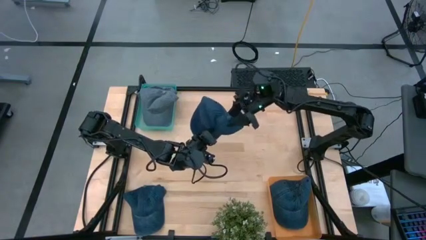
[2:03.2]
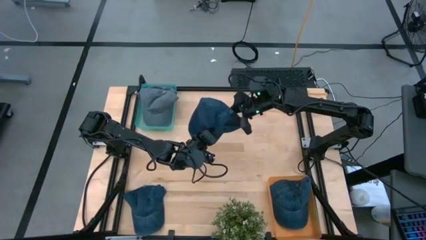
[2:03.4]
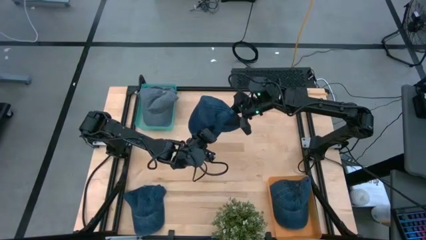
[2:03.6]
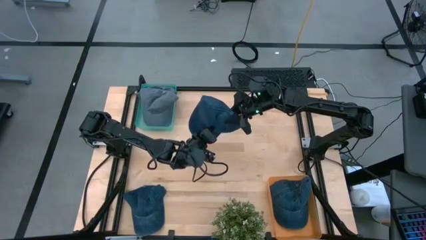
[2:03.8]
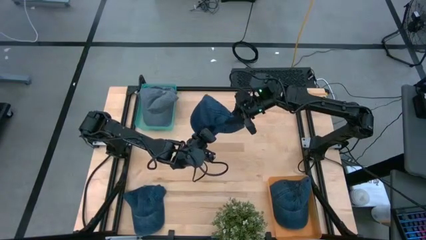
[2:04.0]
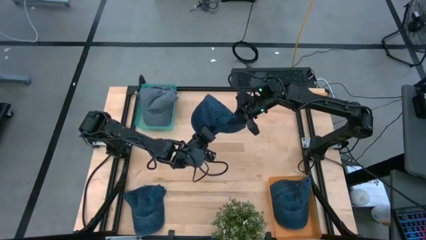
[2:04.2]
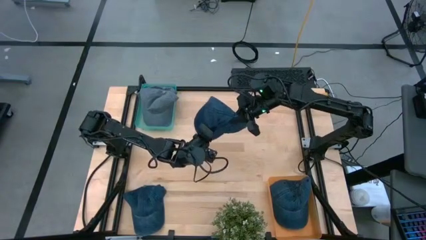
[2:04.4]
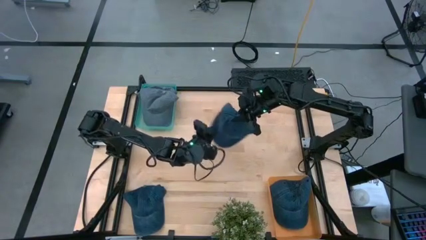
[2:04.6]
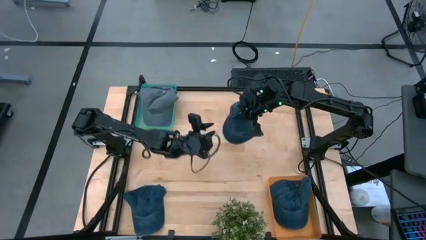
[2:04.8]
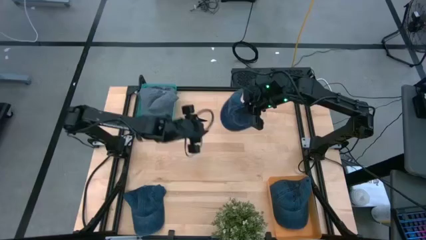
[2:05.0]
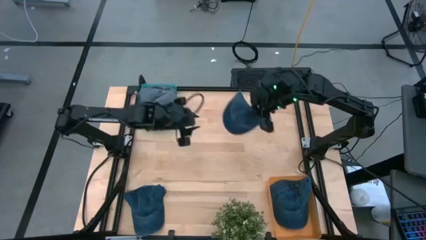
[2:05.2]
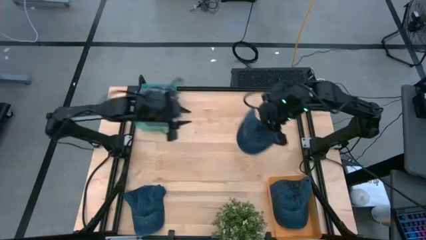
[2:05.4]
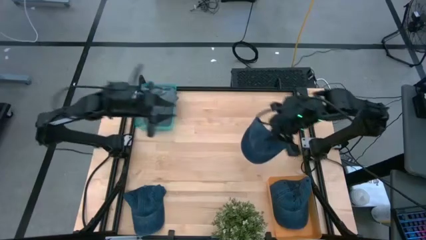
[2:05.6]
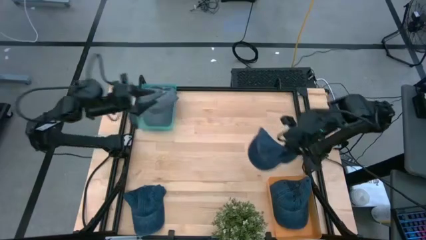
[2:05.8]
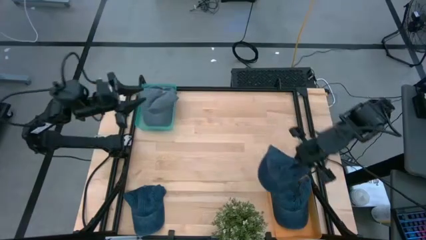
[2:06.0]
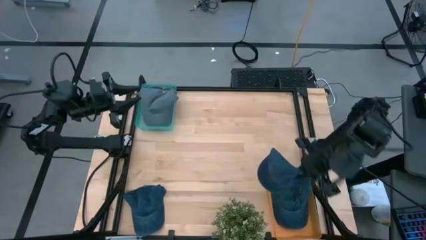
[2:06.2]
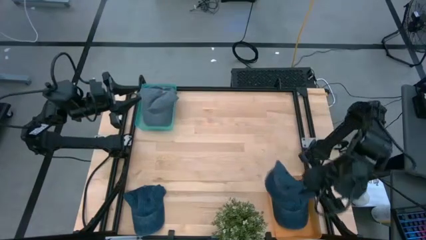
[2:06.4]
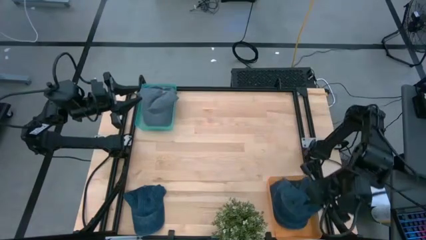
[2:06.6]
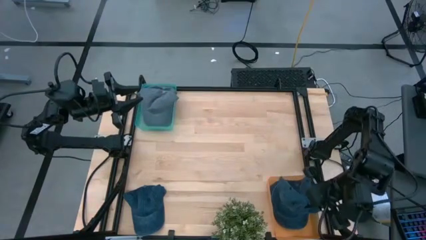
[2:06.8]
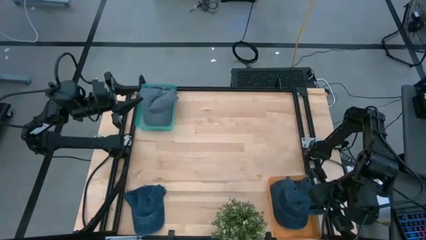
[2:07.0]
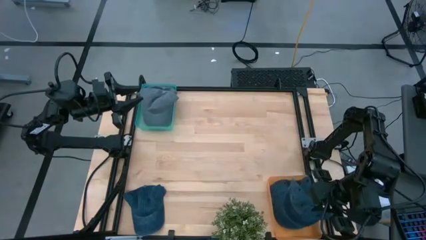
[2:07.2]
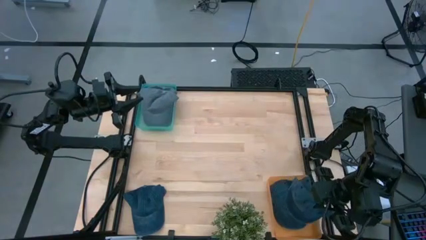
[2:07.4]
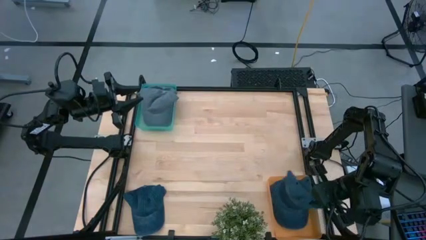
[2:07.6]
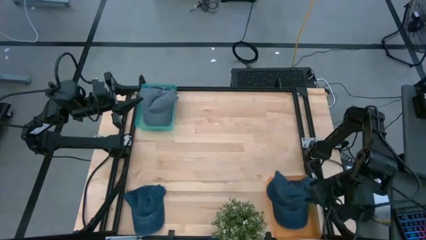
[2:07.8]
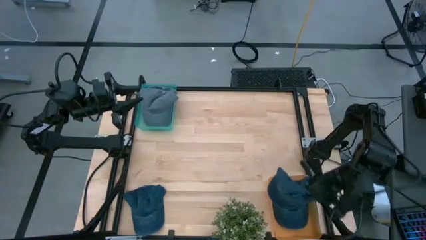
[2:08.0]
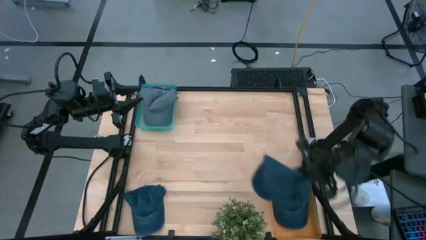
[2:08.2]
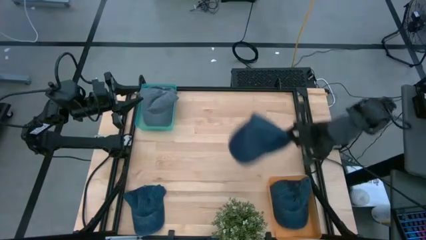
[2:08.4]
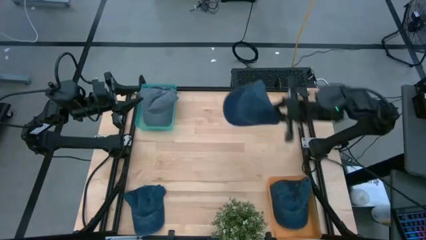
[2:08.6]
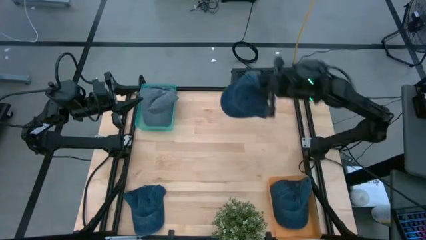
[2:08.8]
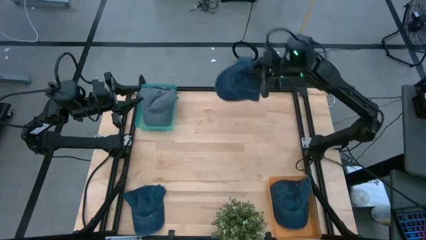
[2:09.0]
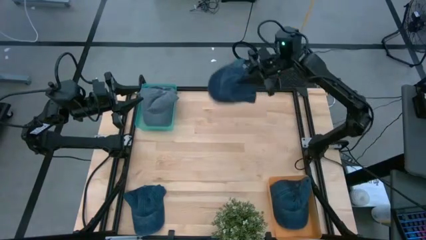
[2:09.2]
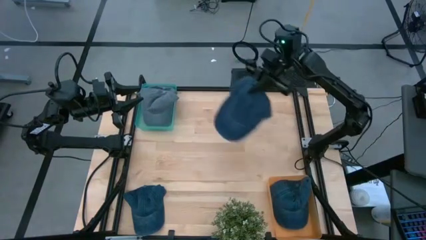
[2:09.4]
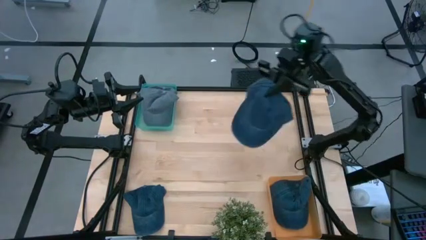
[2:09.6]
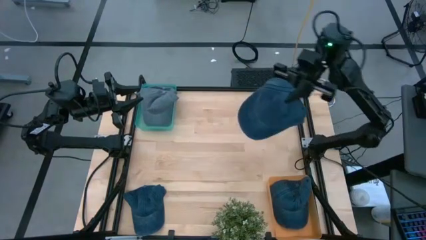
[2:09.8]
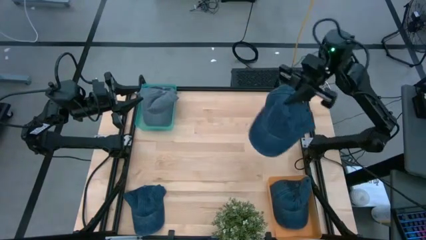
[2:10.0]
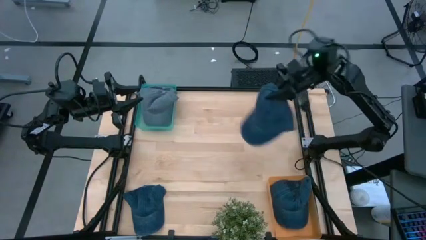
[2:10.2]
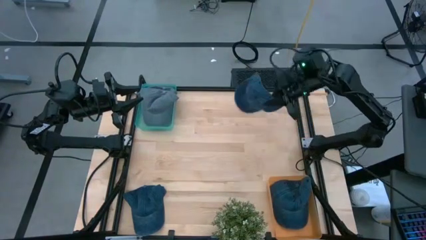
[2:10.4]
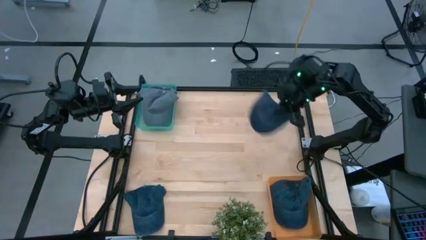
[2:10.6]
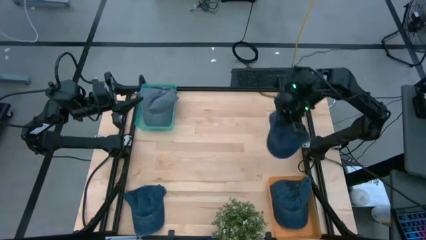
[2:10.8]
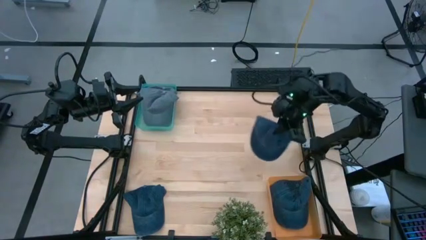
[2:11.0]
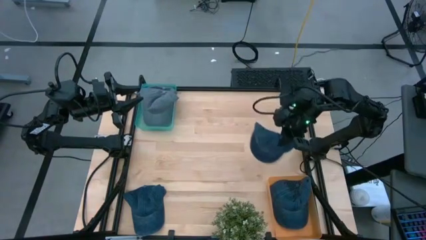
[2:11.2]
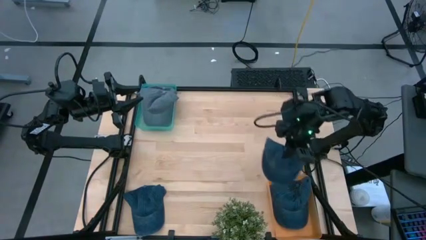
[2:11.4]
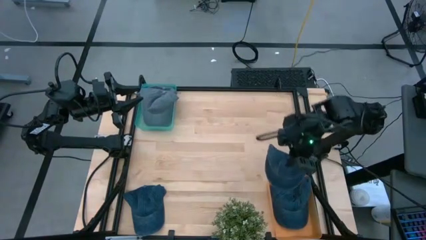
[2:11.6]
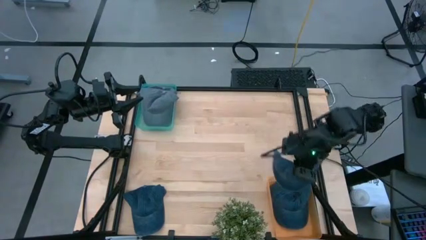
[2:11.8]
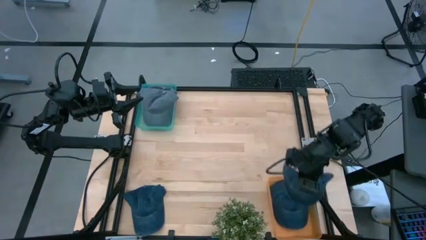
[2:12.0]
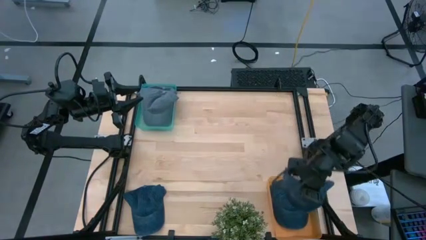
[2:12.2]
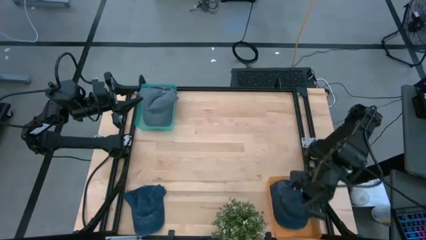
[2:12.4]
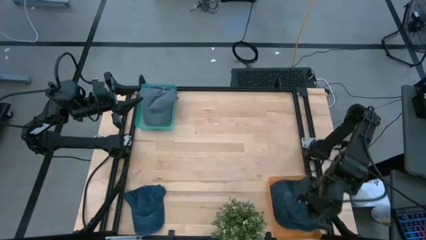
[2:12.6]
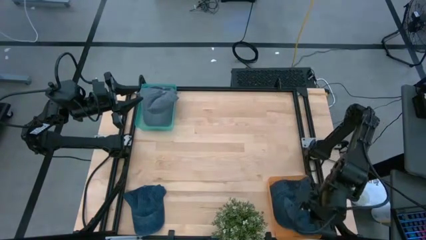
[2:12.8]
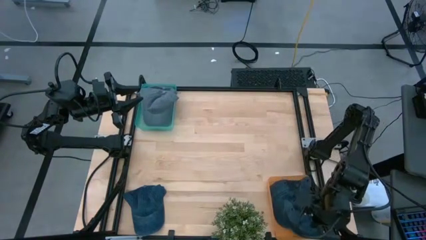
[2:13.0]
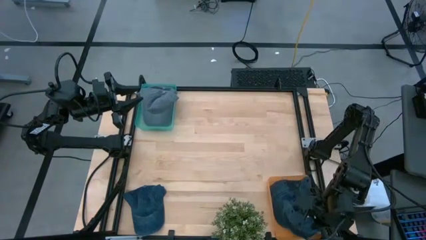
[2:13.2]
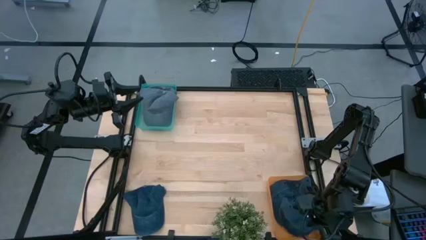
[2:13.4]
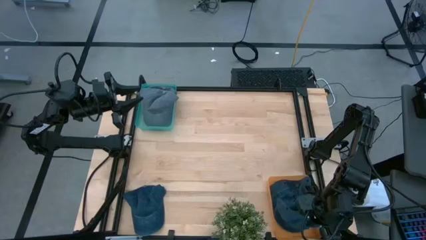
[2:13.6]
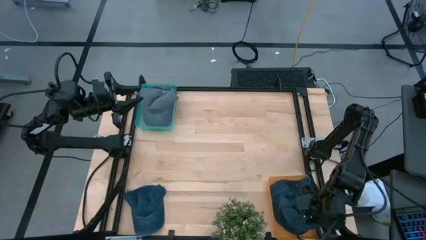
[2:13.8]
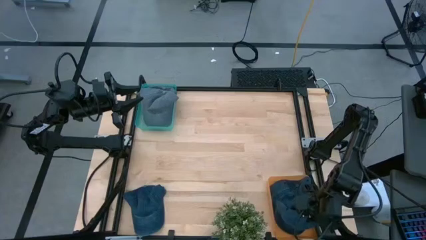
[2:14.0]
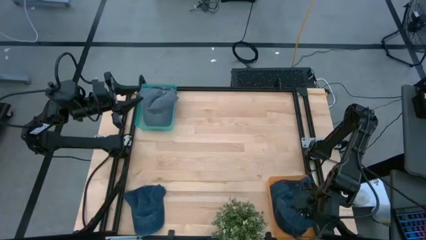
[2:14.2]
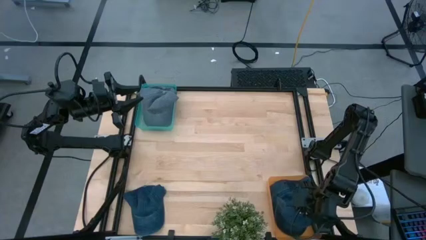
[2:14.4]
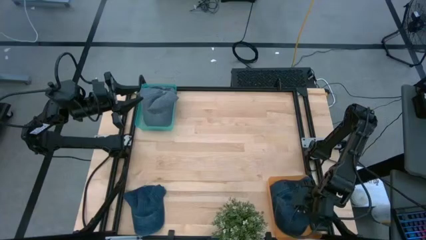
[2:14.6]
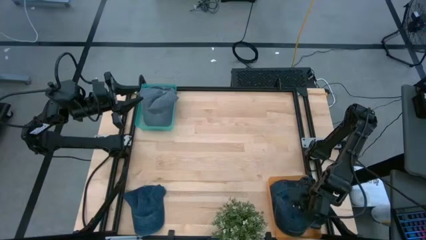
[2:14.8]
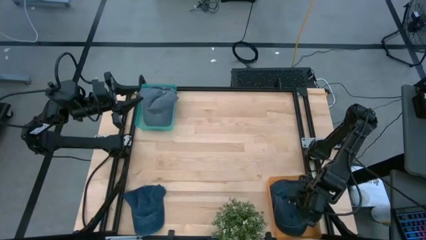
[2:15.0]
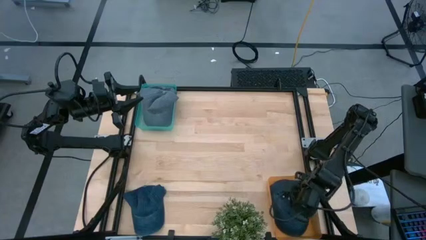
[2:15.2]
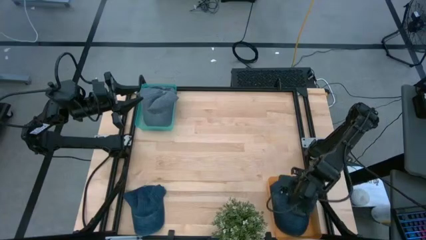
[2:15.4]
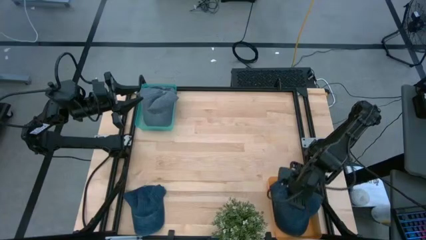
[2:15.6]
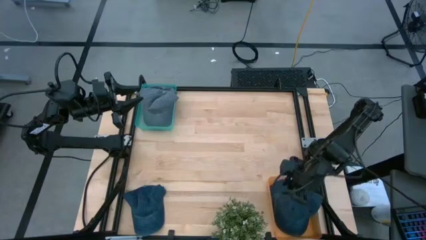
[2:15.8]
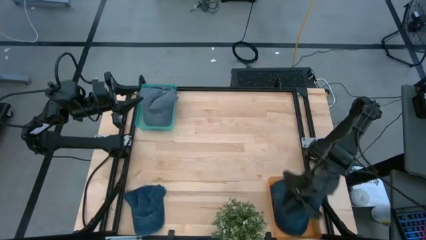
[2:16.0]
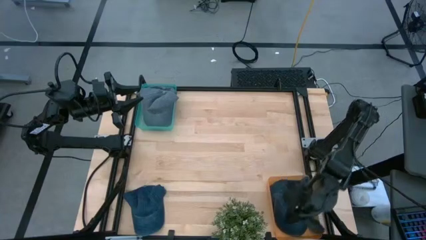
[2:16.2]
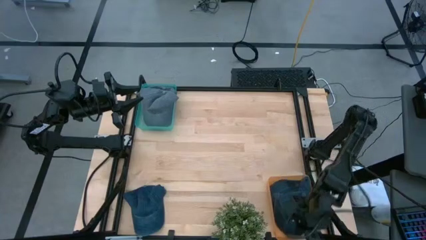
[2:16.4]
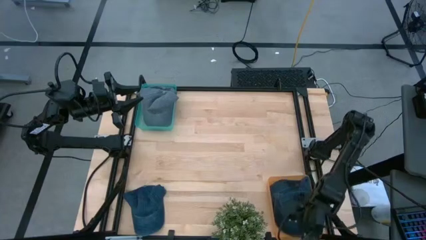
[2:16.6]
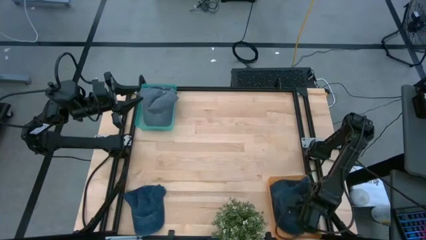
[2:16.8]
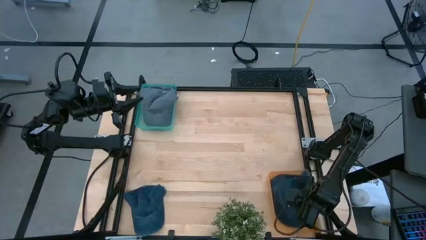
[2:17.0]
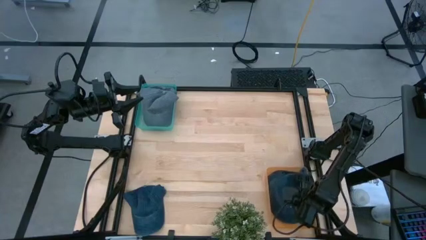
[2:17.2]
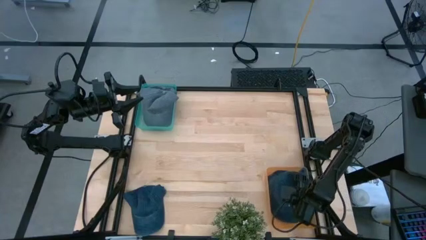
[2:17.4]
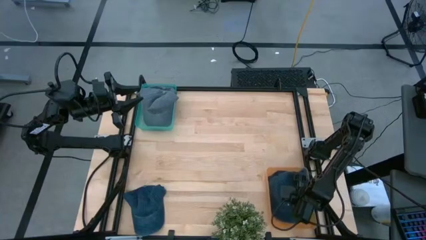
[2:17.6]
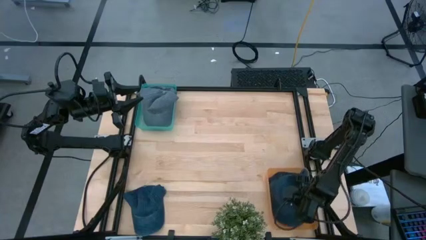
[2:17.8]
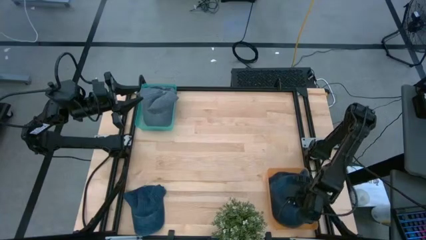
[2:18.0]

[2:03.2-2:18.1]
Task: Pick & Place hat
Put the top blue cap into the orange bin

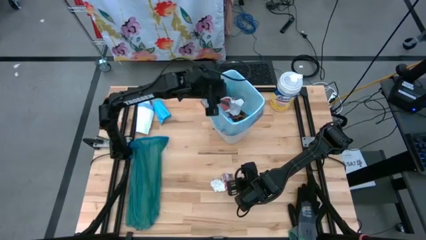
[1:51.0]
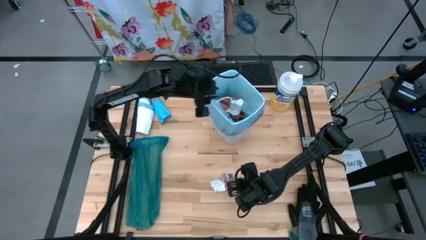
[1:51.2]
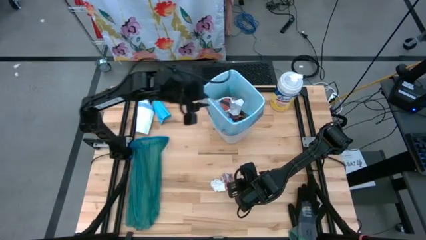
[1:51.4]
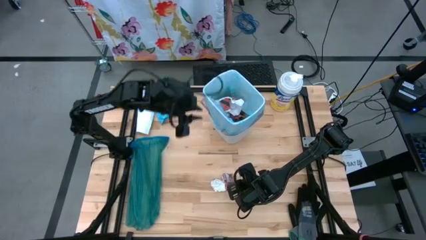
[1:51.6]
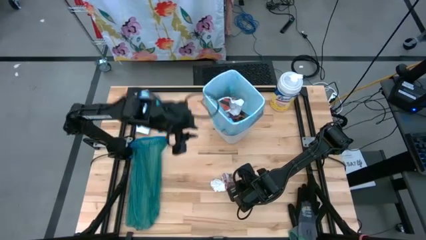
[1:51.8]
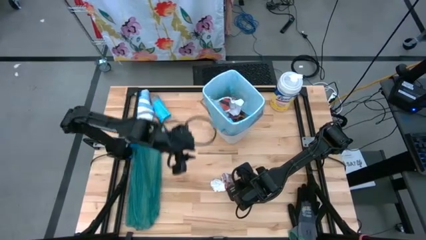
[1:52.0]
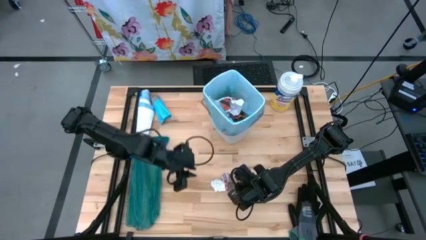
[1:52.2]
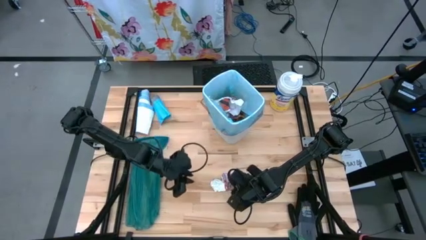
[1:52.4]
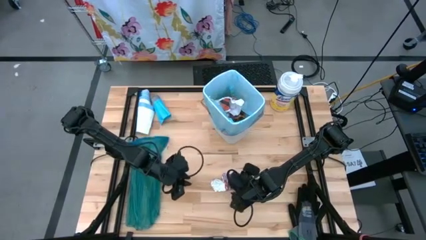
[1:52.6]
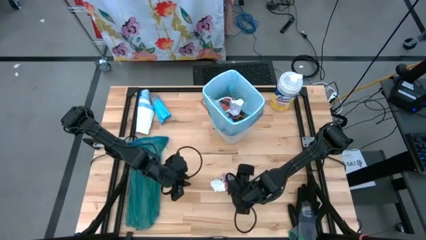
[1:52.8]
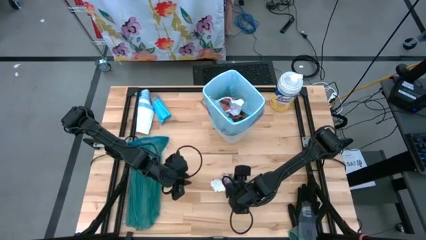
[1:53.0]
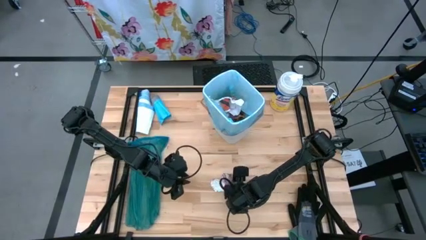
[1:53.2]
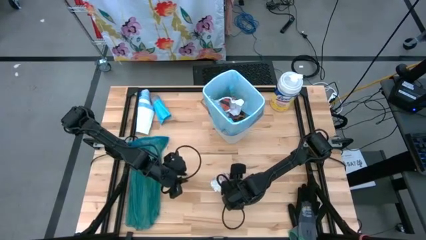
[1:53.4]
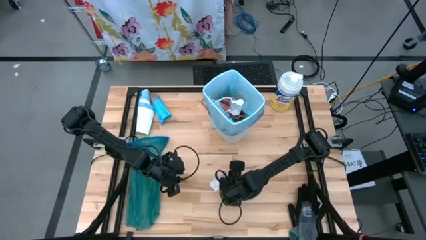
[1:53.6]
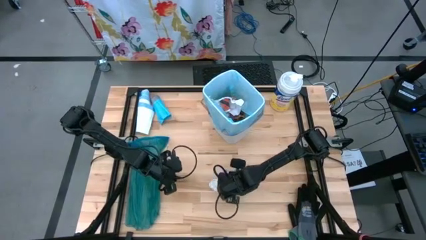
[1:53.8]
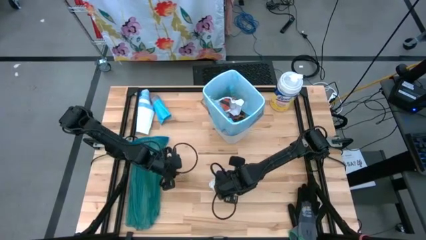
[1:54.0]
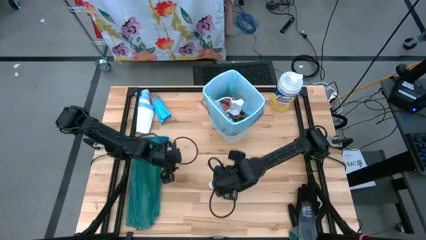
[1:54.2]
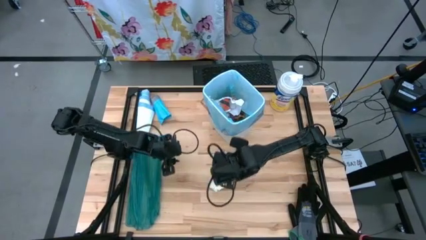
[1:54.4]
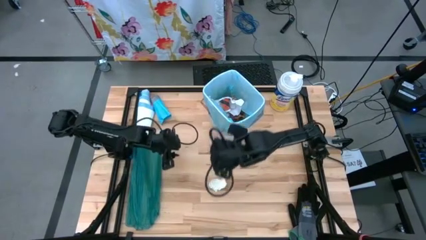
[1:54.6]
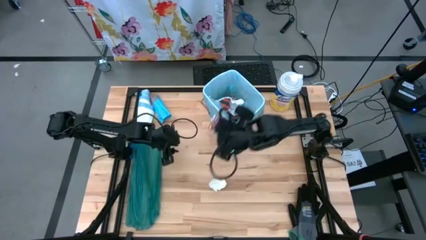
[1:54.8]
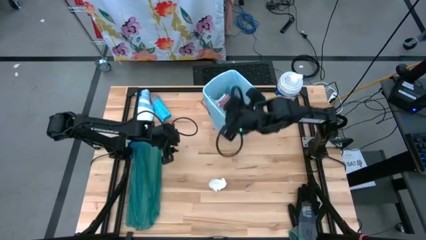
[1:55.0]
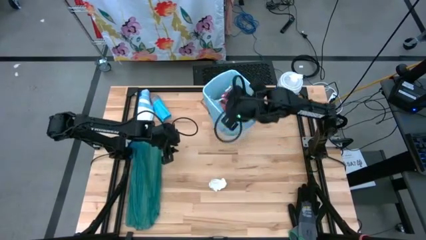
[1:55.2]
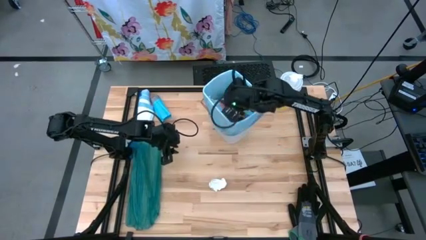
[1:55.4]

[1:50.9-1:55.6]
Task: place trash/remove bag and relplace
Put the red paper into the trash bin
